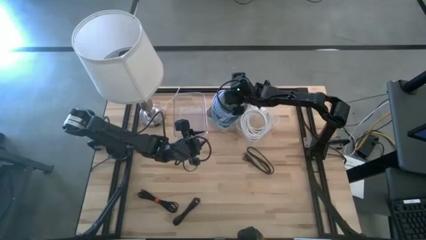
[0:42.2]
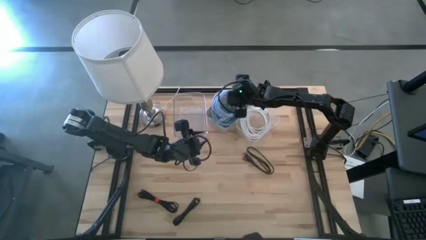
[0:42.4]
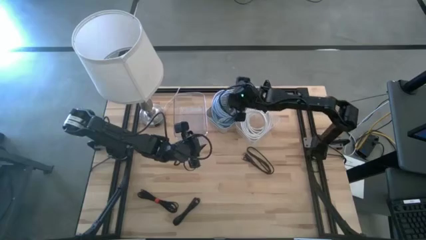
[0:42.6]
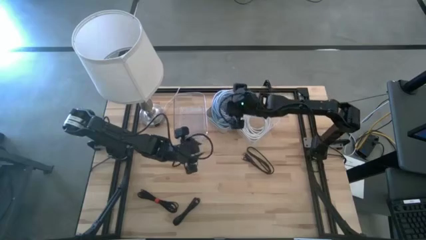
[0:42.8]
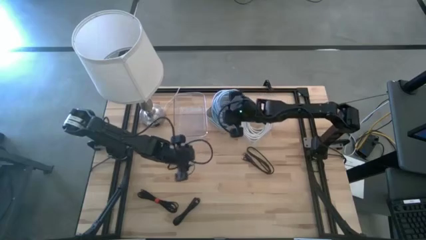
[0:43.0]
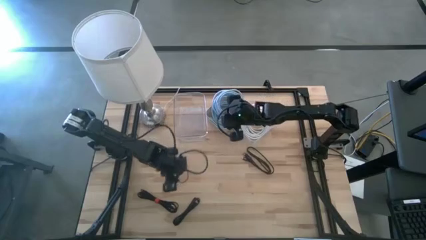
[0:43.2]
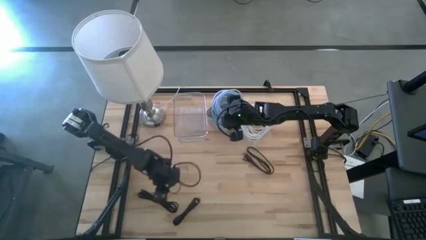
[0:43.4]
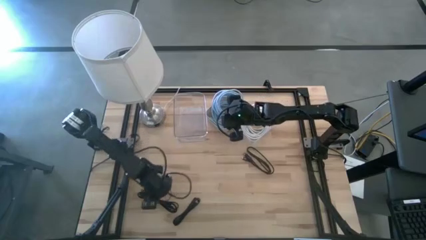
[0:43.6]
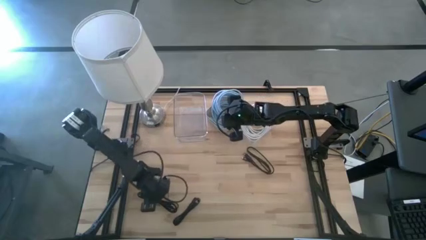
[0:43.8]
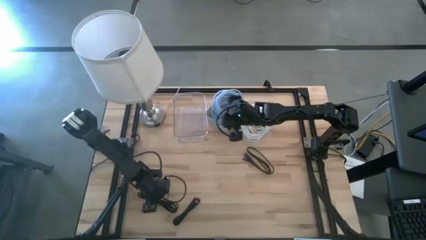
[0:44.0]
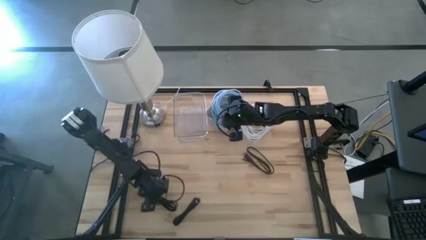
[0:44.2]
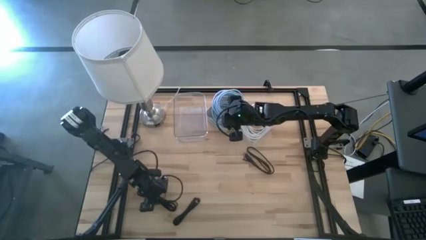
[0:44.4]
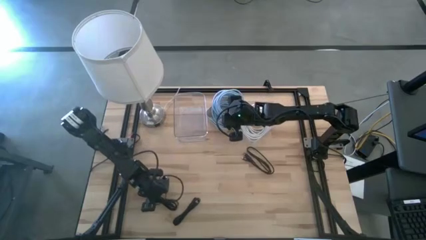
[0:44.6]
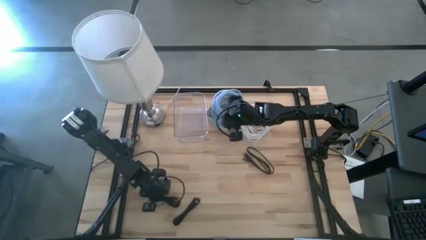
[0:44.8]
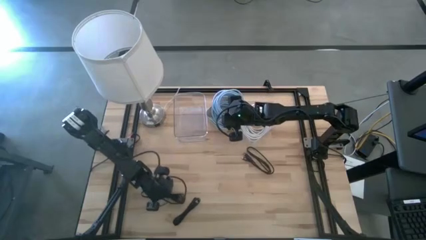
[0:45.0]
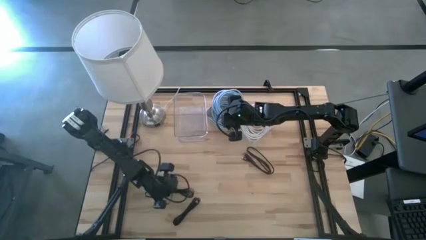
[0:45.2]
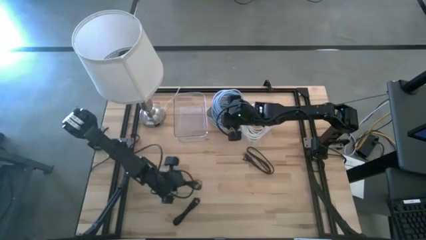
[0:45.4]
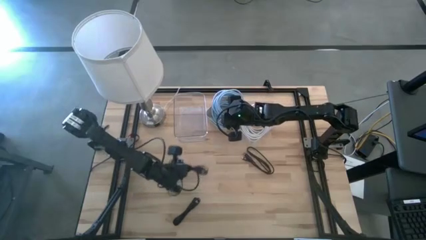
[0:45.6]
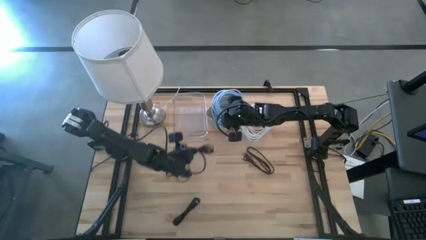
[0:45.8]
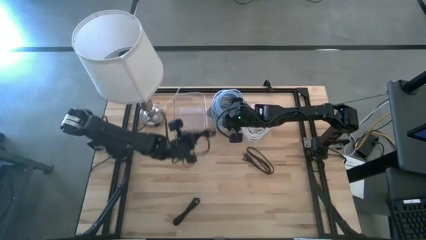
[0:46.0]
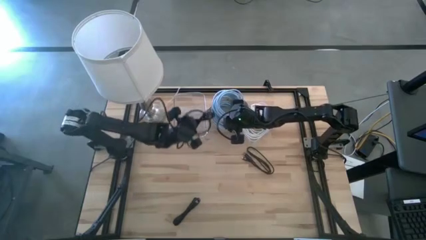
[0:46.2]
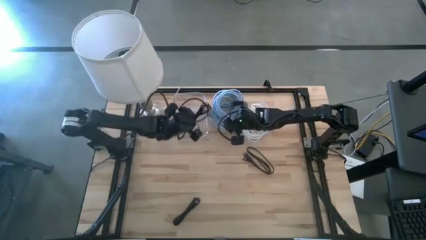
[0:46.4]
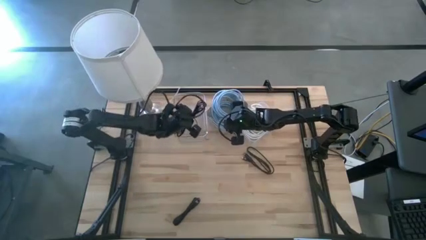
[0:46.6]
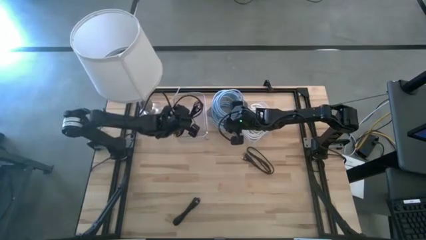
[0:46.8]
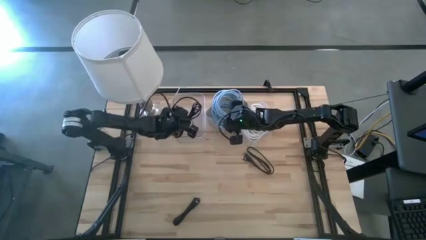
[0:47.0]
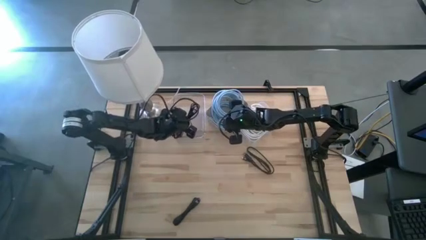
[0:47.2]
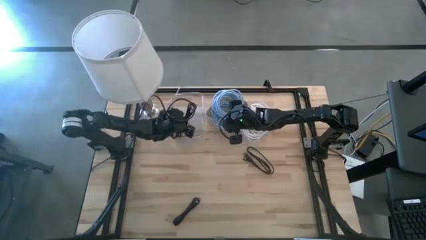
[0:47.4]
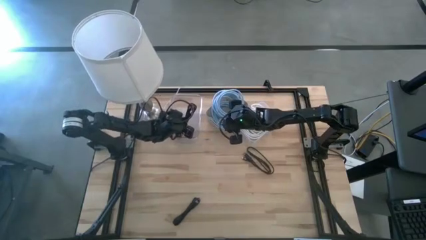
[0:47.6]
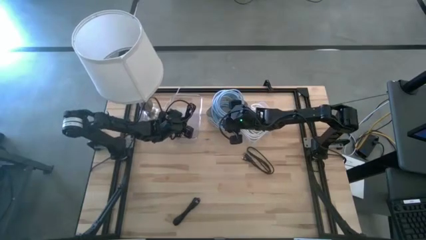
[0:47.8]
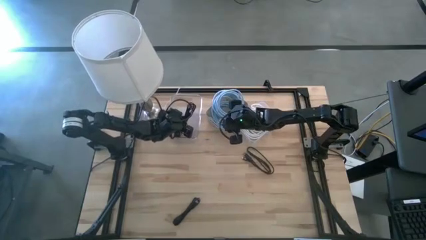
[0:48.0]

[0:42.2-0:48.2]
Task: Sort HDMI cables
Put the bottom left black HDMI cable into the left transparent bin

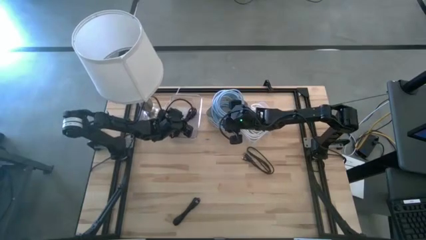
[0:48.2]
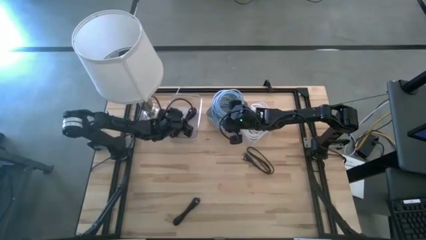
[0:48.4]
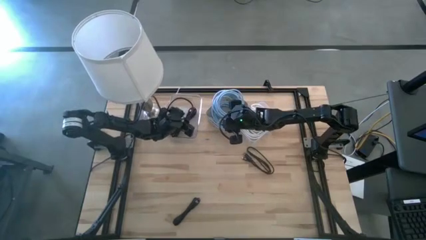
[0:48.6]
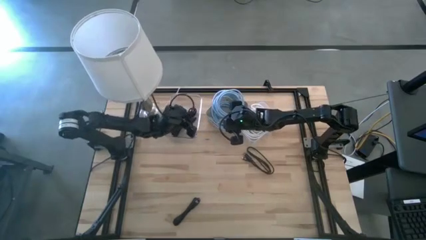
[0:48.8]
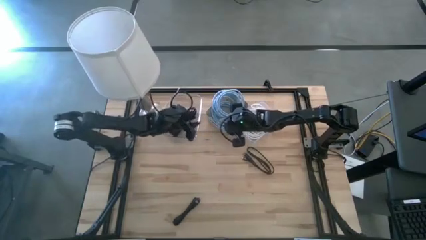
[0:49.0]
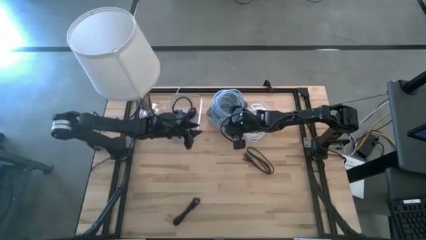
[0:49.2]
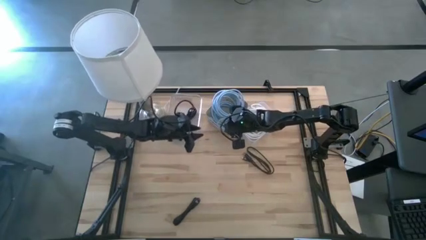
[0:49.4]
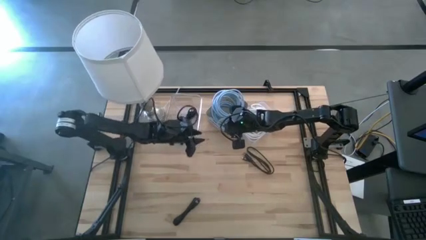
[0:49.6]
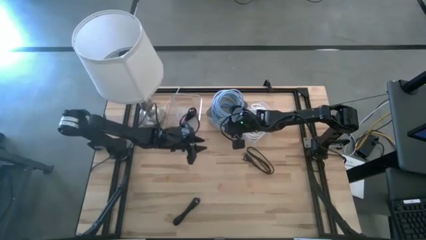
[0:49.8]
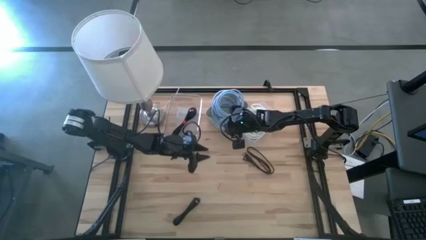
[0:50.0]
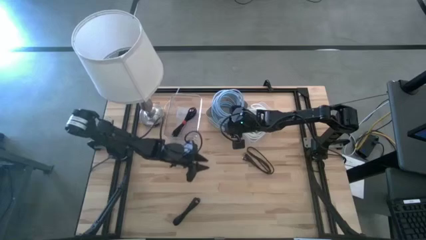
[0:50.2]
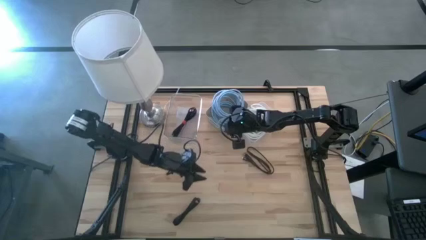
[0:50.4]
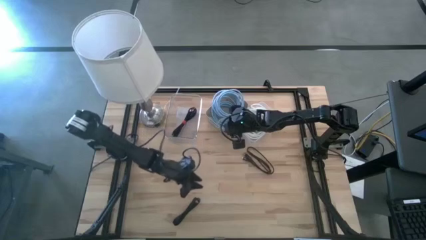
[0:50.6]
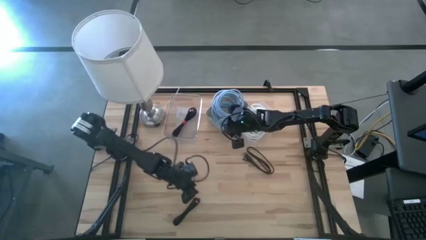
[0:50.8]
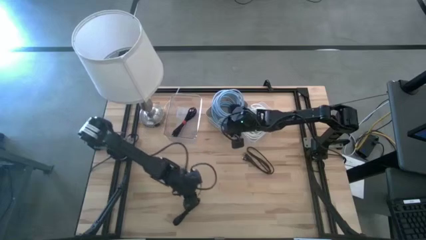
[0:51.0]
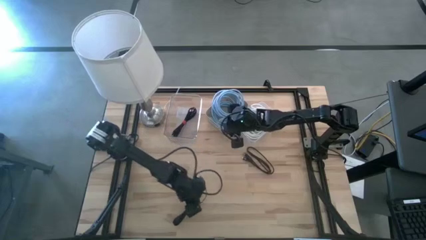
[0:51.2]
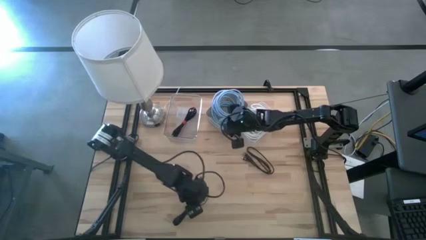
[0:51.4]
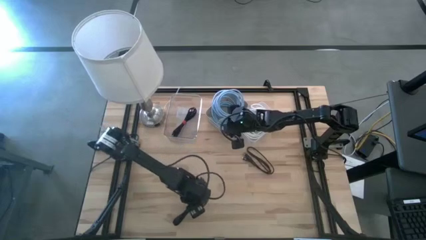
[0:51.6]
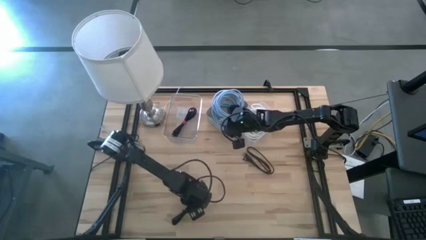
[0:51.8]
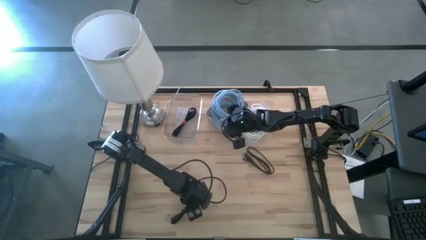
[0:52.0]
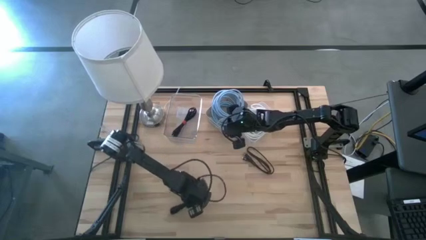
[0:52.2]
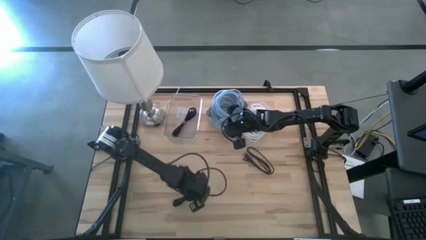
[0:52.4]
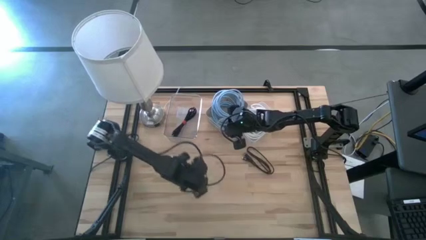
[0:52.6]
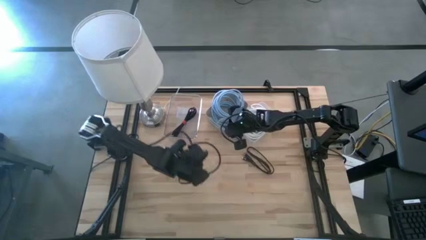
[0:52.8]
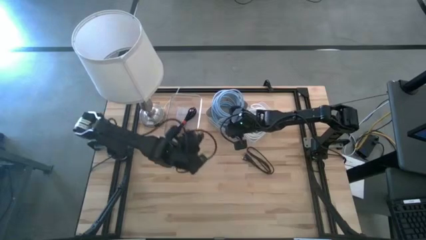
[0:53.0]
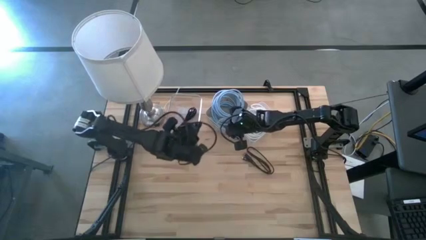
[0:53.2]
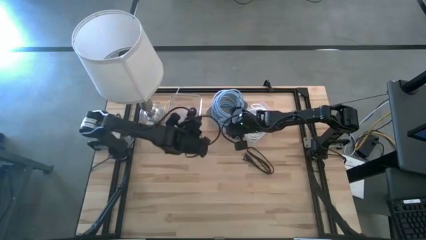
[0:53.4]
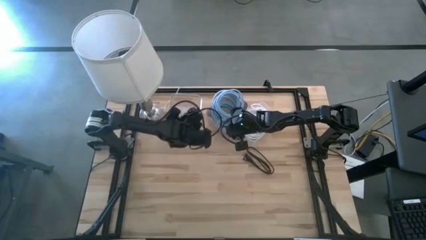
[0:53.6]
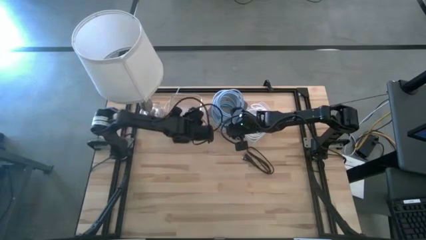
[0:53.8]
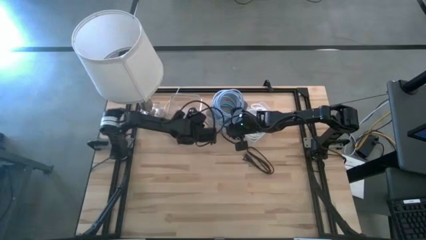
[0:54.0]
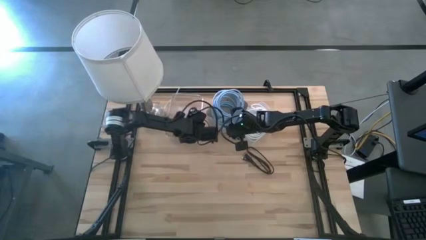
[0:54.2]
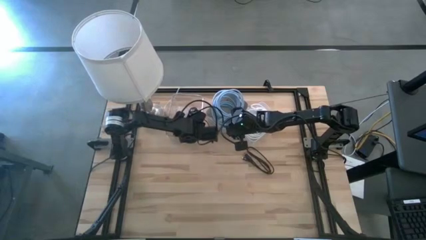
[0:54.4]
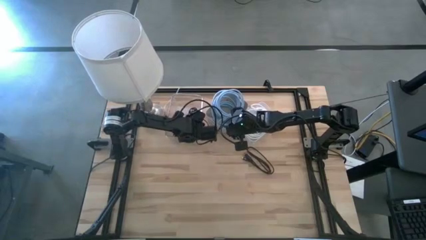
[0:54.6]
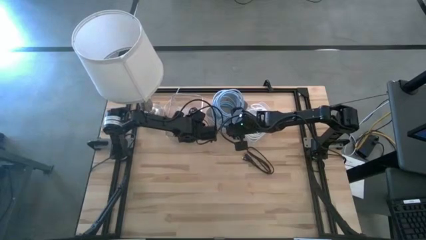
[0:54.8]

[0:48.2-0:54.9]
Put the bottom black HDMI cable into the left transparent bin

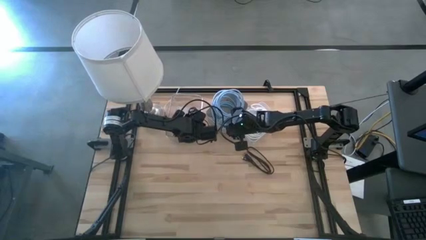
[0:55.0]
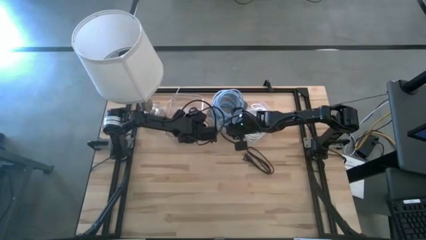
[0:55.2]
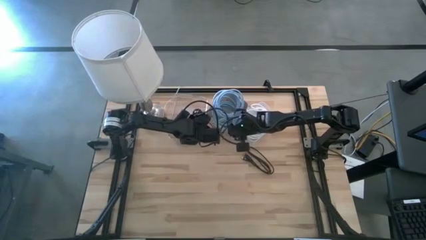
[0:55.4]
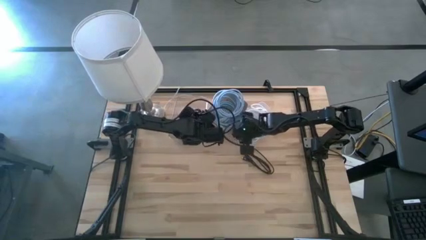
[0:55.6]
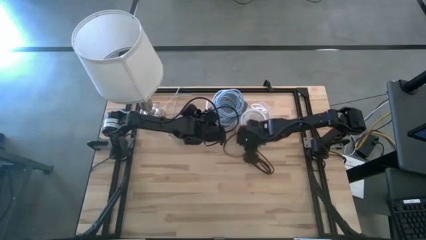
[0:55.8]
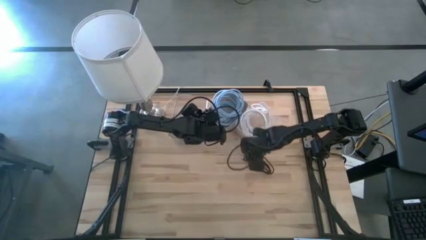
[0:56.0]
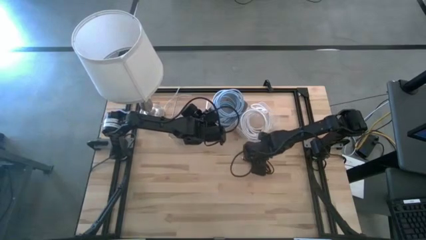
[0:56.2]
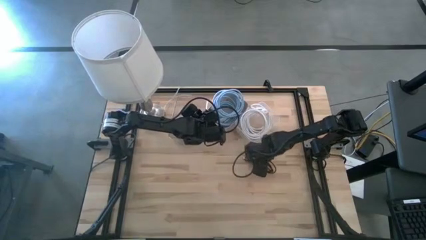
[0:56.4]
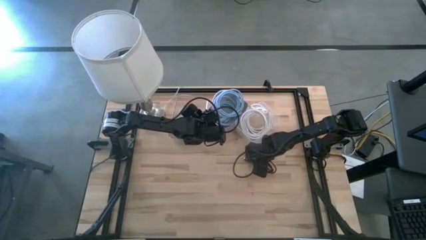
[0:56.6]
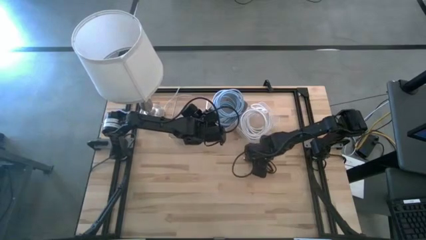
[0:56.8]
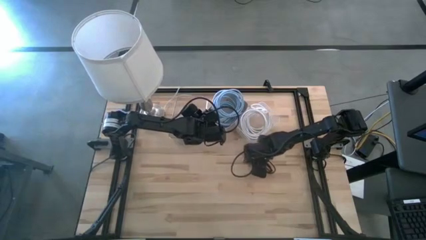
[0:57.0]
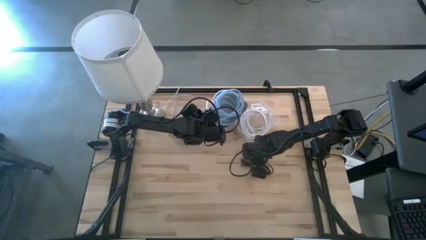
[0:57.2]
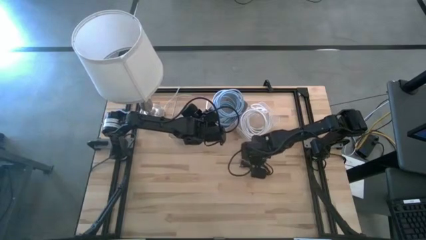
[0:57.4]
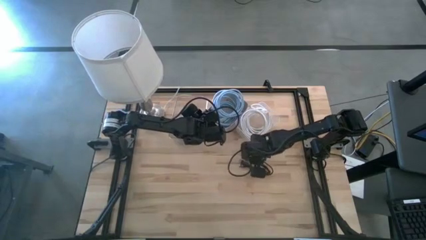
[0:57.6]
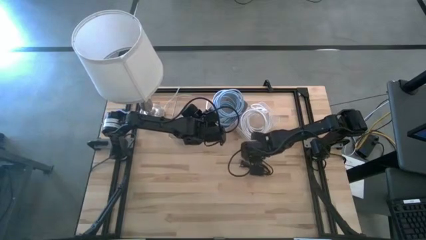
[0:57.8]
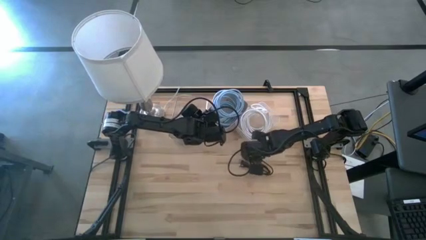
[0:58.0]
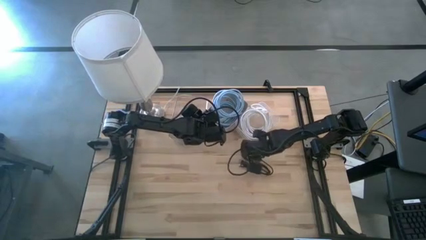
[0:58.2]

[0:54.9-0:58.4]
Put the black HDMI cable into the left transparent bin
